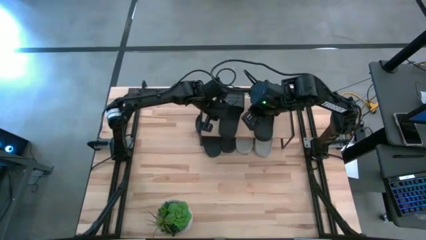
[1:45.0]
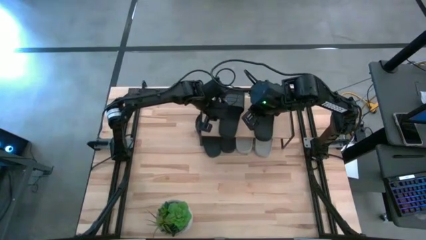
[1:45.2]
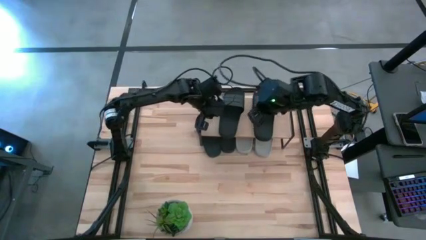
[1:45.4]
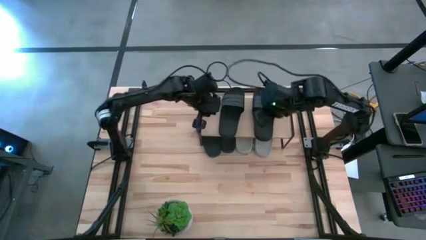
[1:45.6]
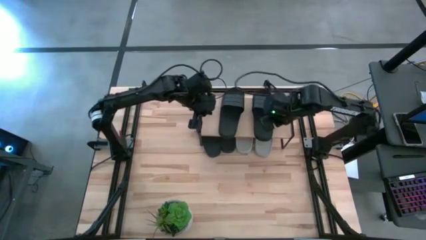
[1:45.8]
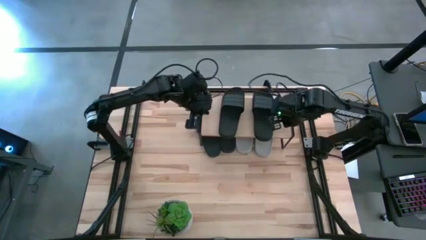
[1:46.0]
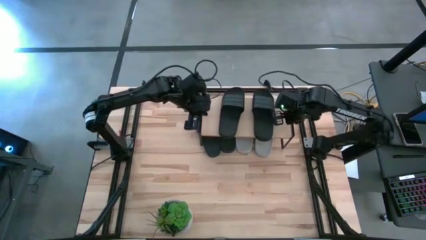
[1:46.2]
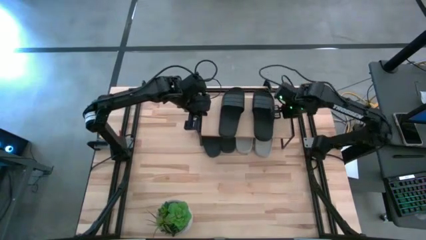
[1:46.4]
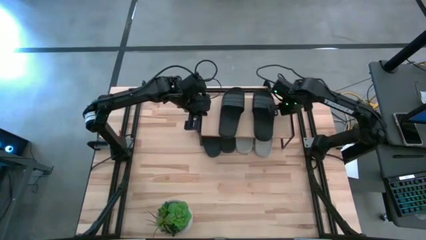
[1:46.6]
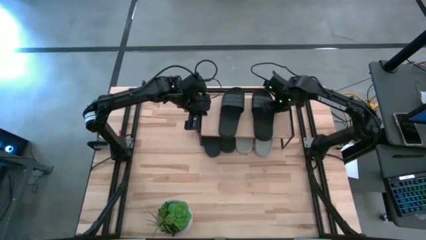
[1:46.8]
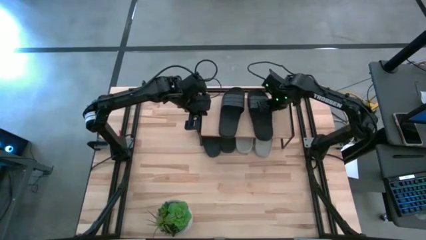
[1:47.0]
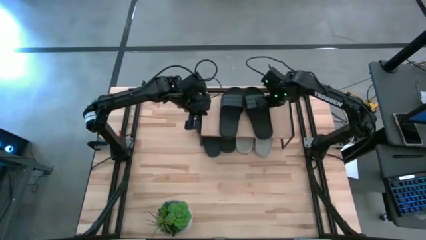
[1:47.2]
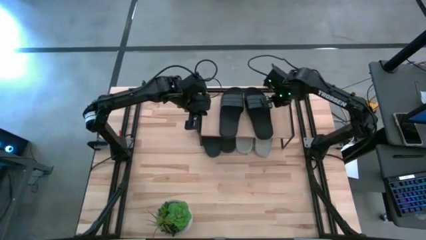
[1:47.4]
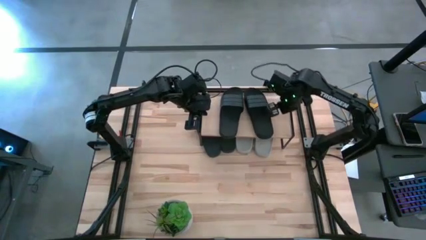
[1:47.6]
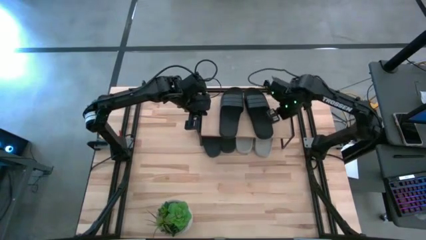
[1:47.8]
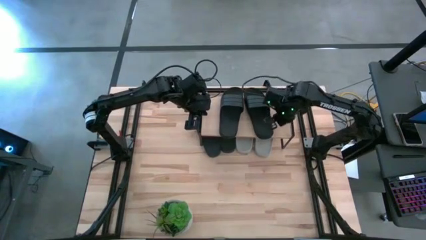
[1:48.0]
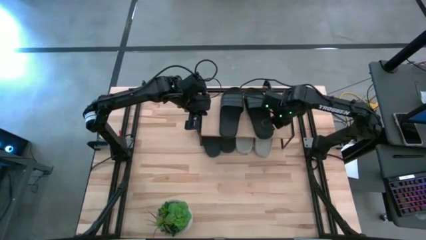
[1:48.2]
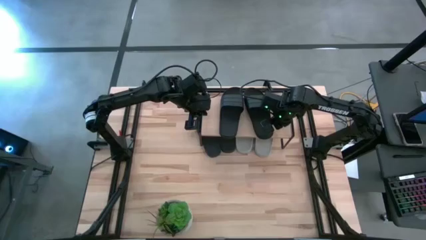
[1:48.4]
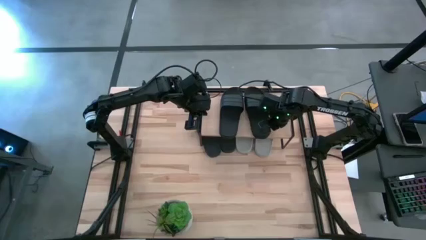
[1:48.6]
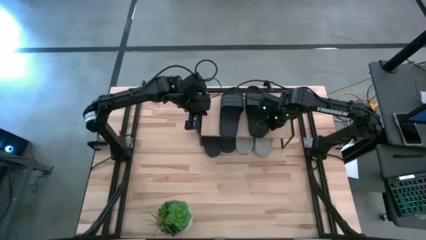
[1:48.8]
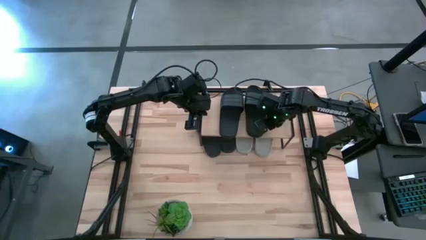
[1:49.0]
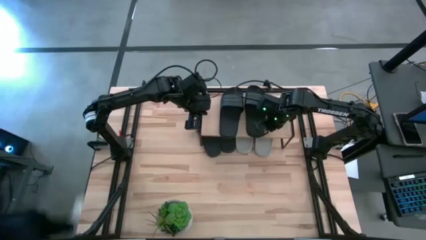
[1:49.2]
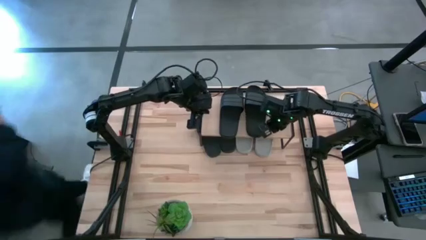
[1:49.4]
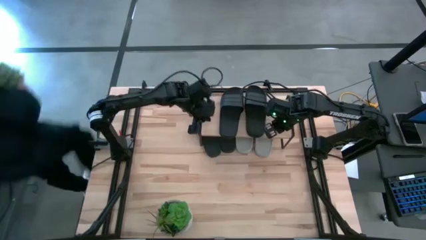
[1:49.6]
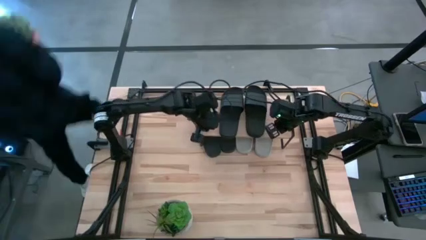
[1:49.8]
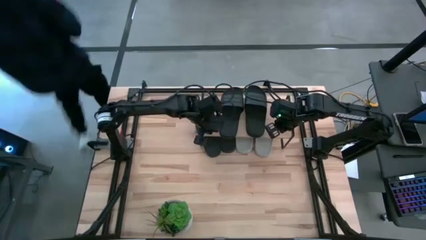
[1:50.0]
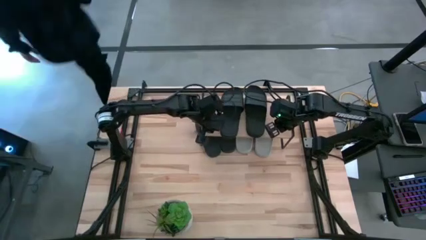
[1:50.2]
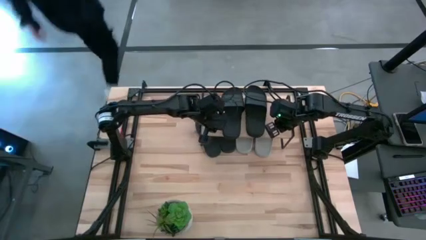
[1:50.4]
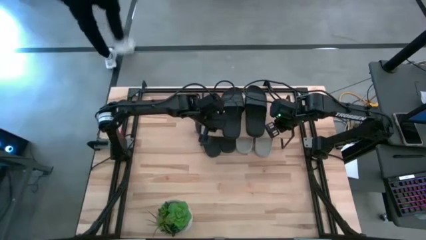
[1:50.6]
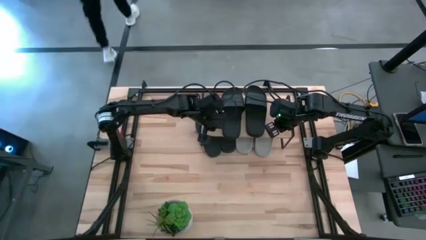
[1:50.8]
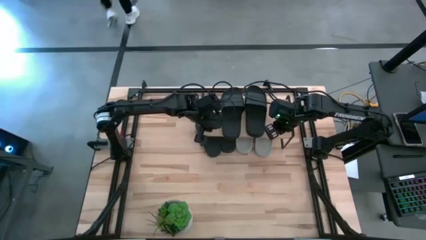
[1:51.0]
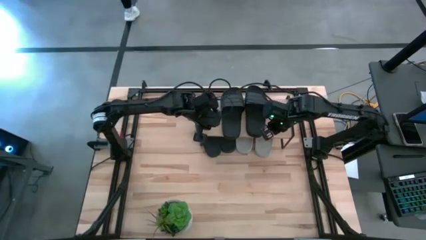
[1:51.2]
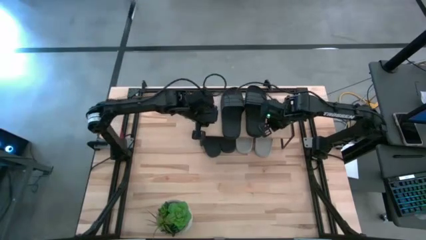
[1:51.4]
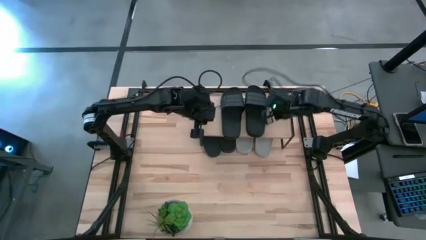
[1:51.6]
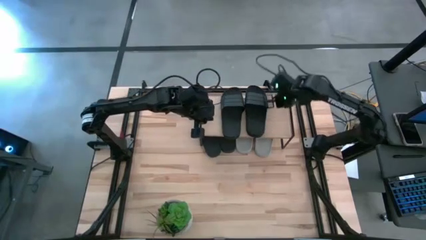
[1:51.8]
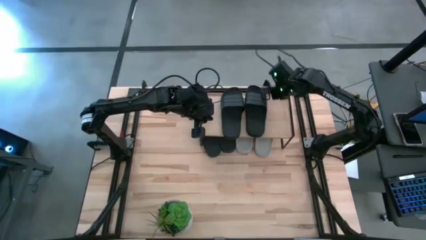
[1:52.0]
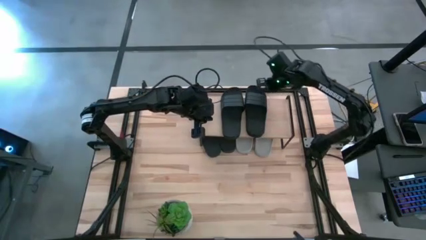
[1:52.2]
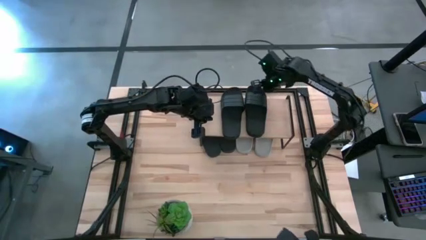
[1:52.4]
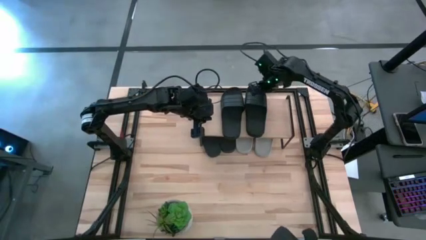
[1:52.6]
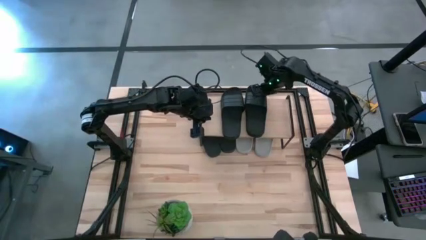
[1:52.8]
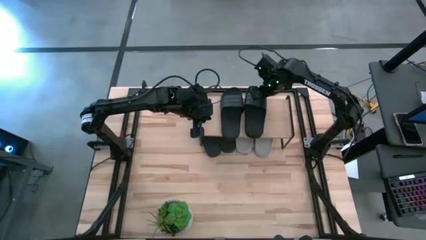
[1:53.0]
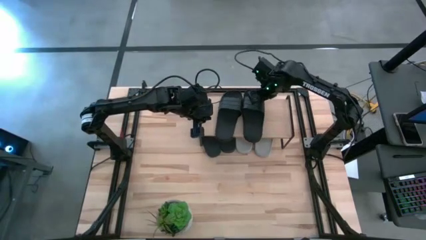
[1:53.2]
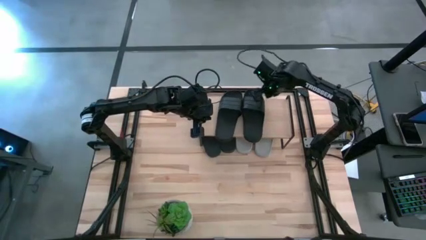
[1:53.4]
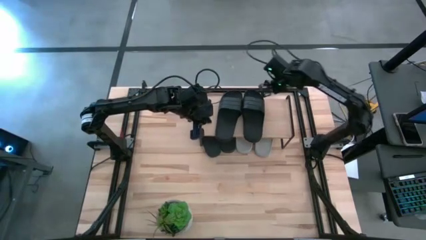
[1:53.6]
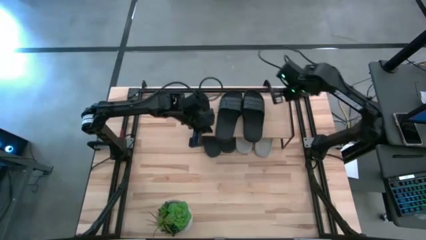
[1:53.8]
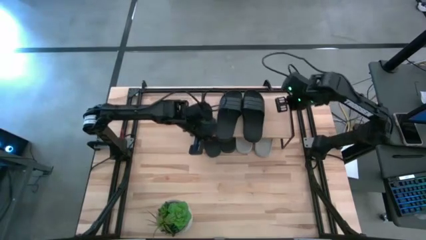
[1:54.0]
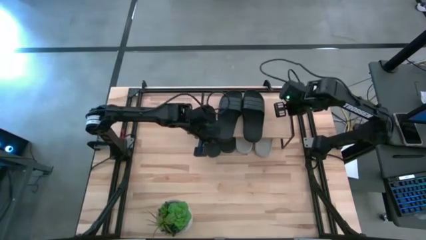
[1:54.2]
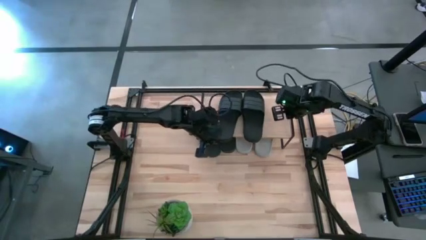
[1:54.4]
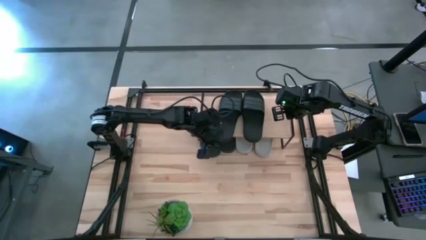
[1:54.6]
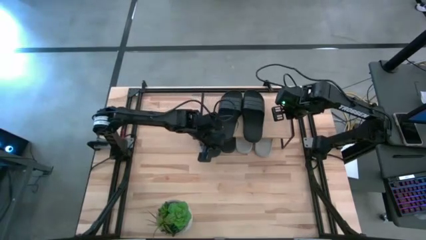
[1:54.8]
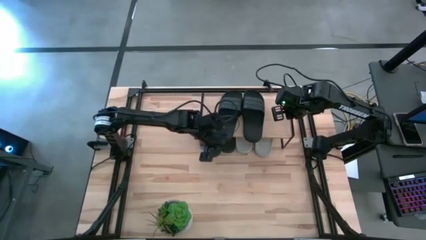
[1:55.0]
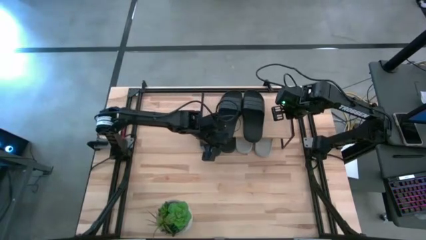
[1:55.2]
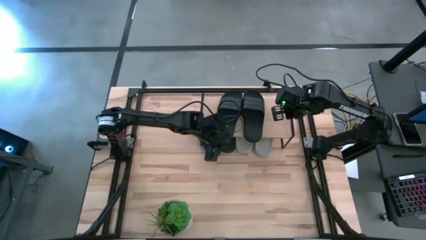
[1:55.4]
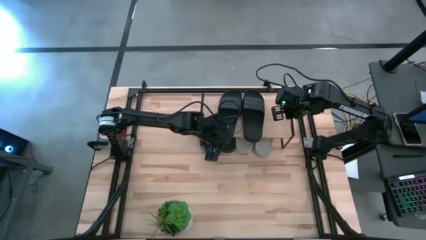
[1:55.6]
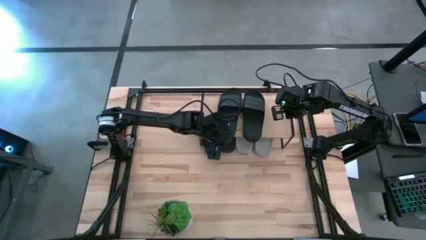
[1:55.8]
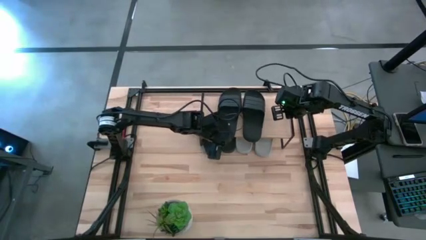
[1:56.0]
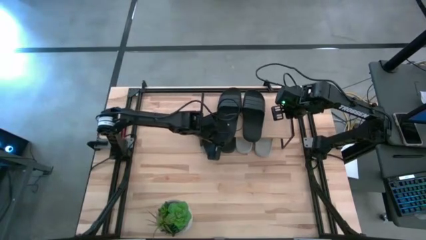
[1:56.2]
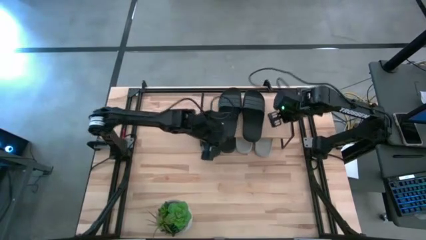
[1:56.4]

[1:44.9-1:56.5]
Task: Pick and place slides into the shelf
Adjust the black slippers on the shelf

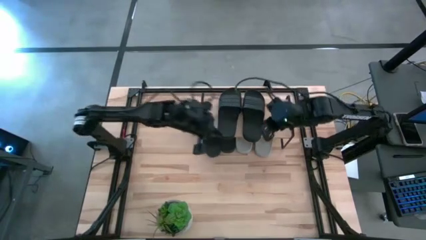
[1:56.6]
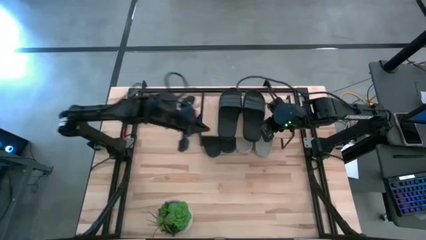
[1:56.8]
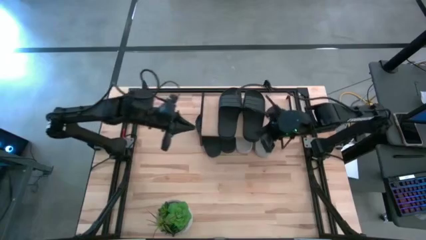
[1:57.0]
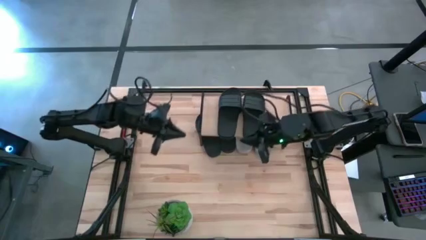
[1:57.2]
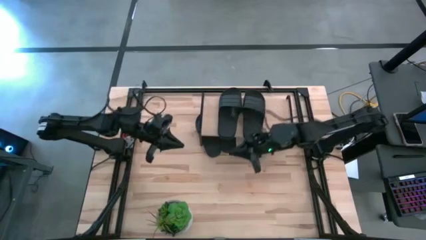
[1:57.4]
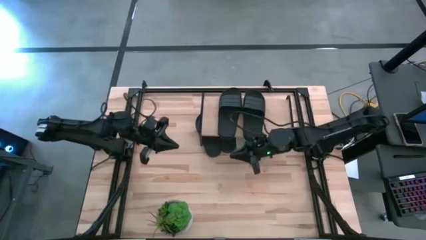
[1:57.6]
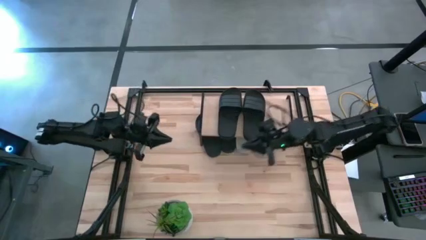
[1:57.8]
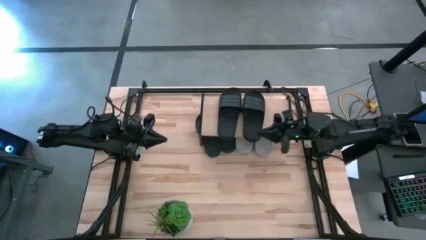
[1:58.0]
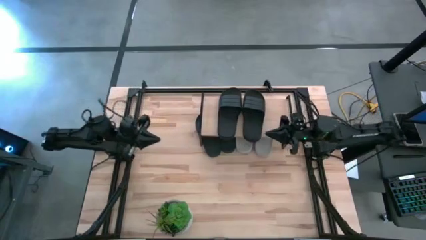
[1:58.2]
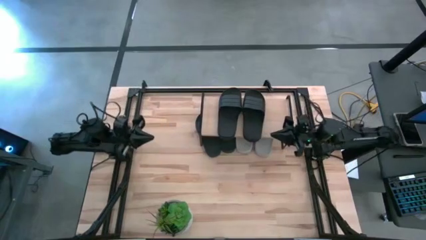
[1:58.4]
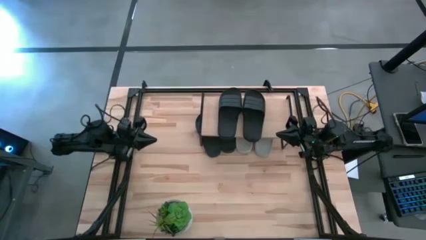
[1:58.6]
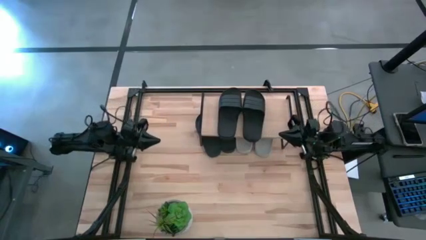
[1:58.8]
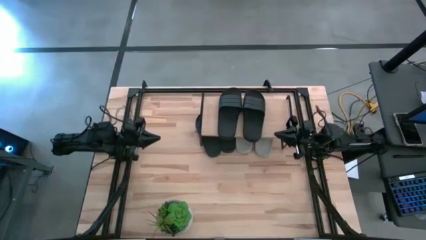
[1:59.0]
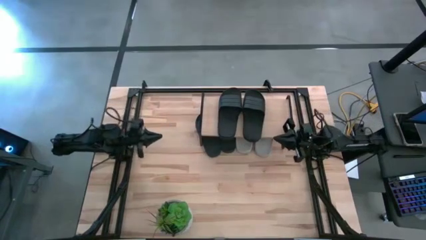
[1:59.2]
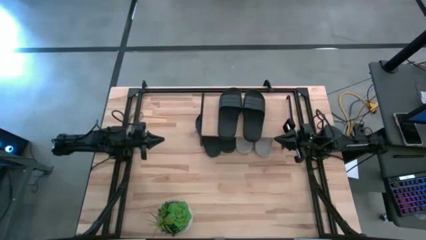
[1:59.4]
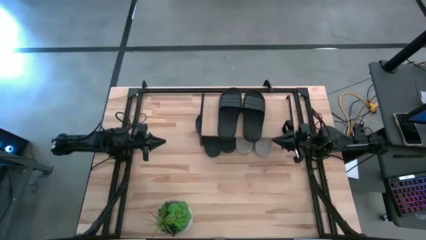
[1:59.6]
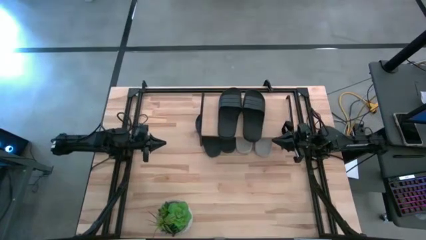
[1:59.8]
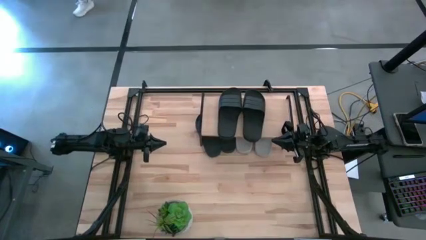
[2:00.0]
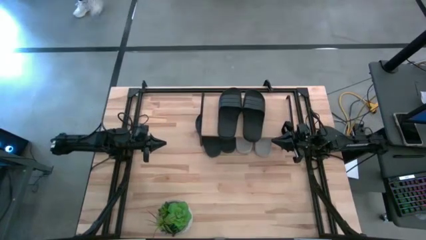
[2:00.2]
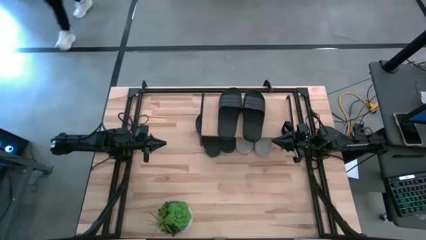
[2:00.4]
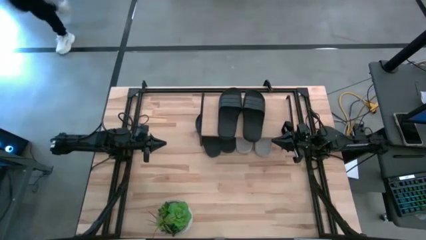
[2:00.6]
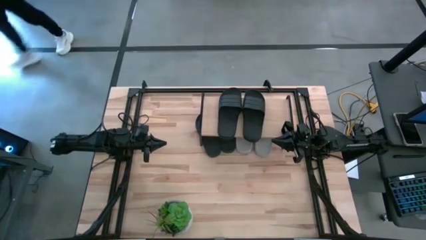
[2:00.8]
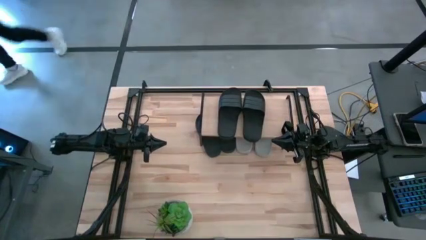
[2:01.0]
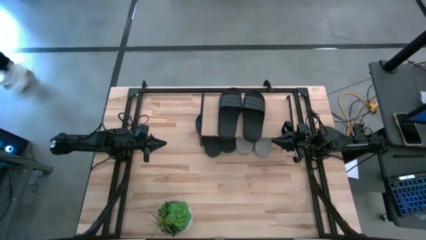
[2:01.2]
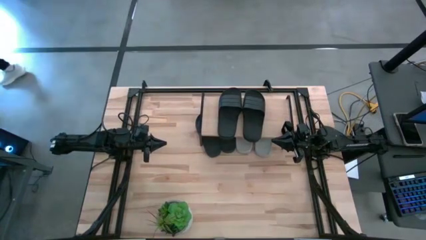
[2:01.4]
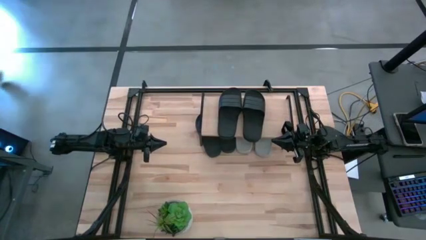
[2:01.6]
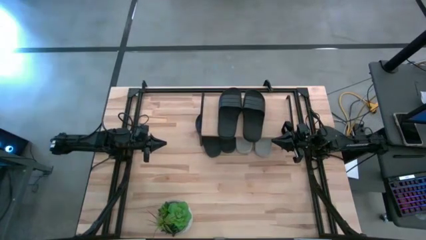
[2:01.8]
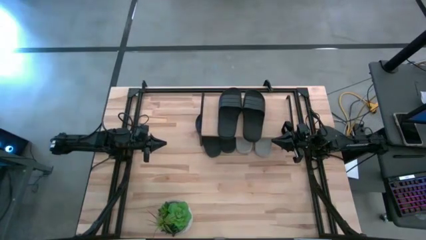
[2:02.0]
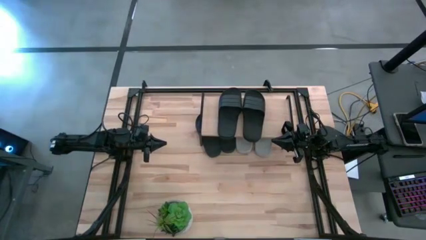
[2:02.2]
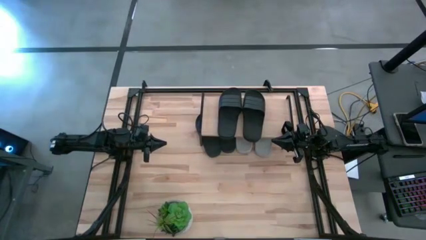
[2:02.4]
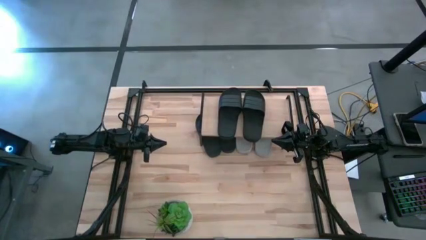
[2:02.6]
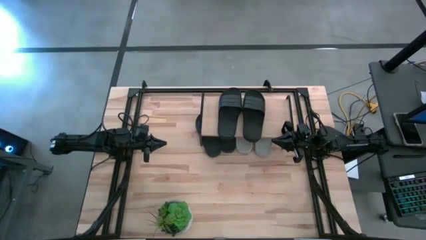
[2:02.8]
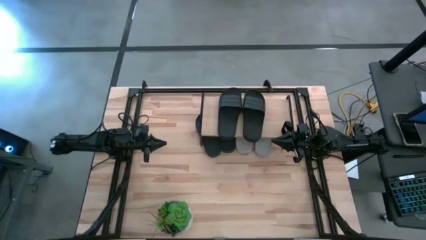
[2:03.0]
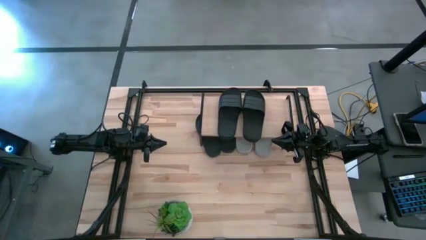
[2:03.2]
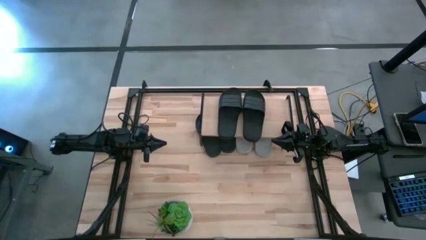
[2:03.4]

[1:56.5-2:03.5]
Return to Home Position
